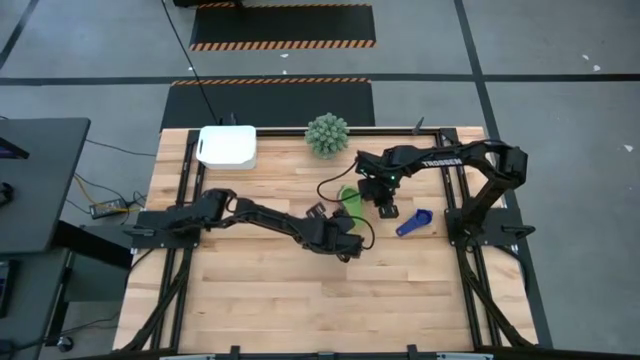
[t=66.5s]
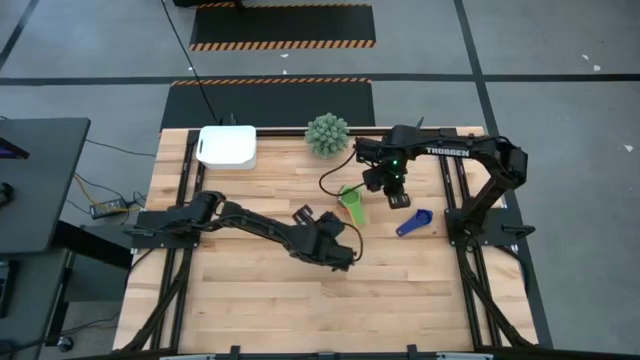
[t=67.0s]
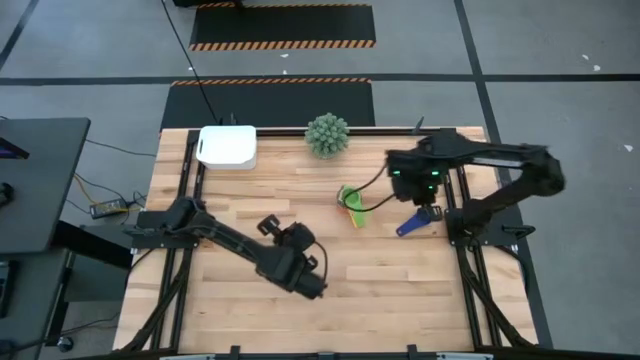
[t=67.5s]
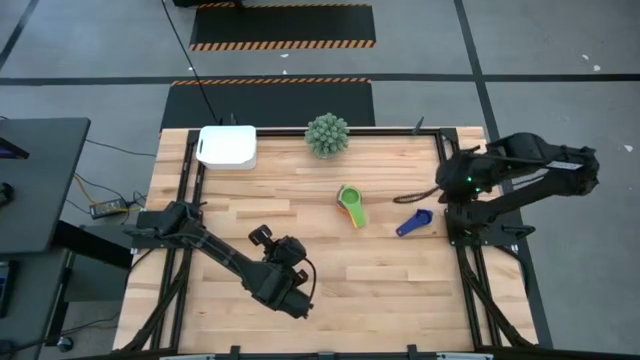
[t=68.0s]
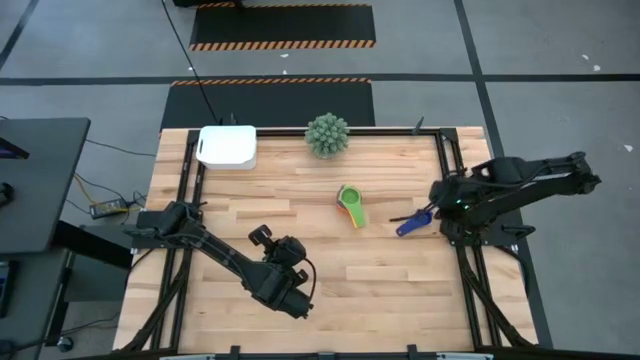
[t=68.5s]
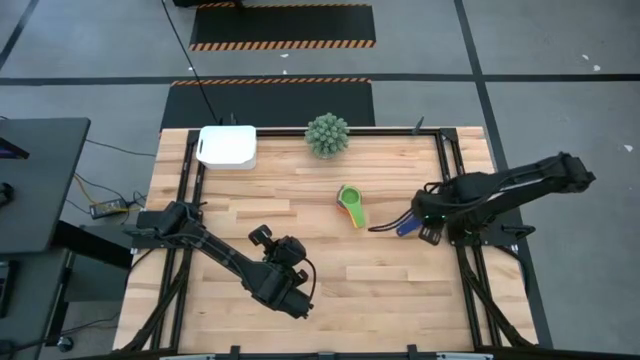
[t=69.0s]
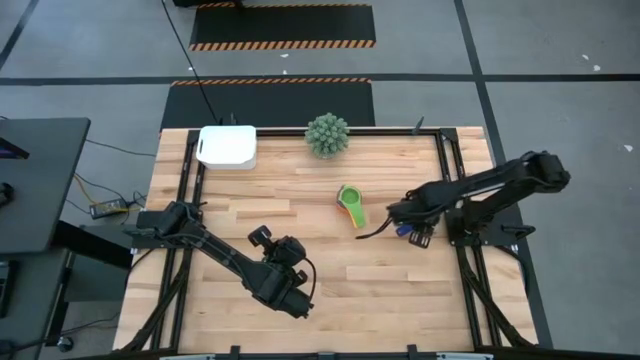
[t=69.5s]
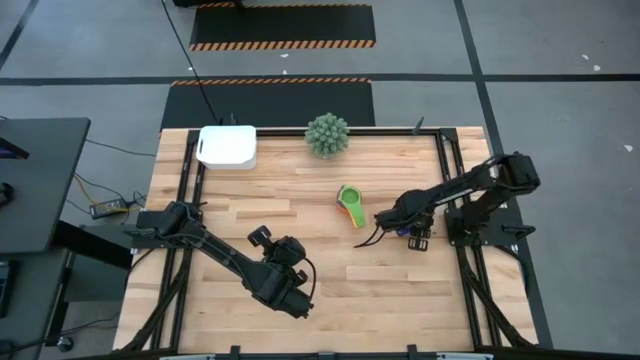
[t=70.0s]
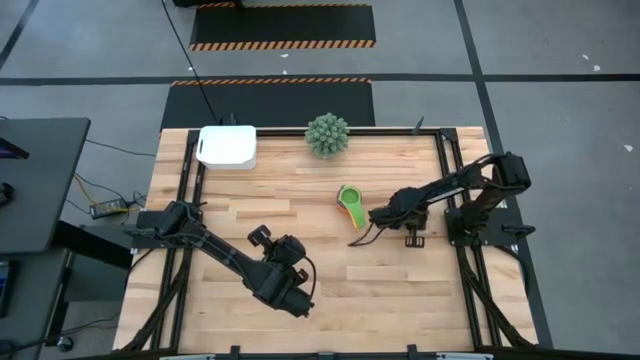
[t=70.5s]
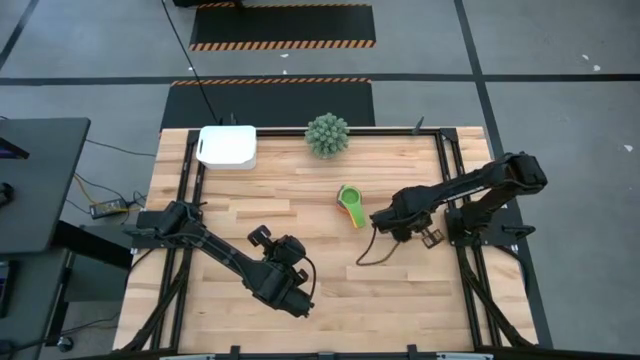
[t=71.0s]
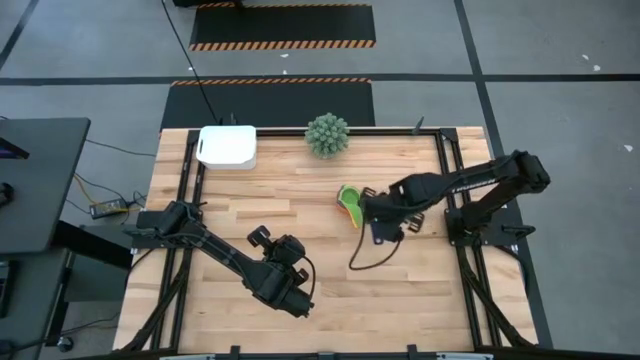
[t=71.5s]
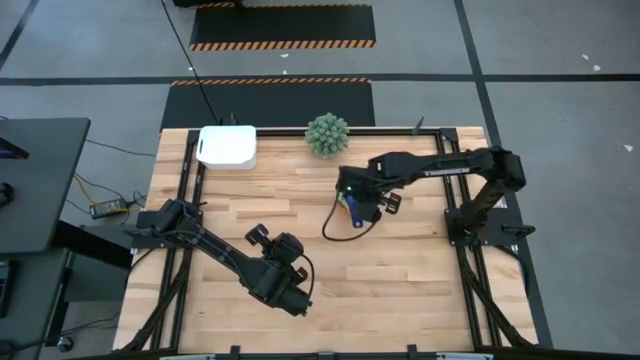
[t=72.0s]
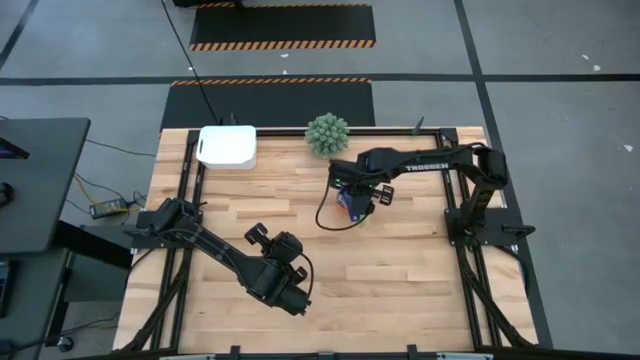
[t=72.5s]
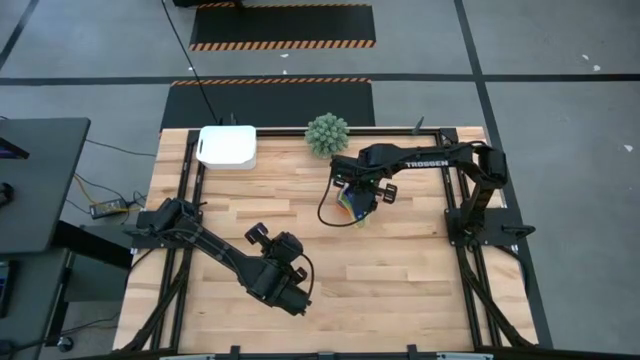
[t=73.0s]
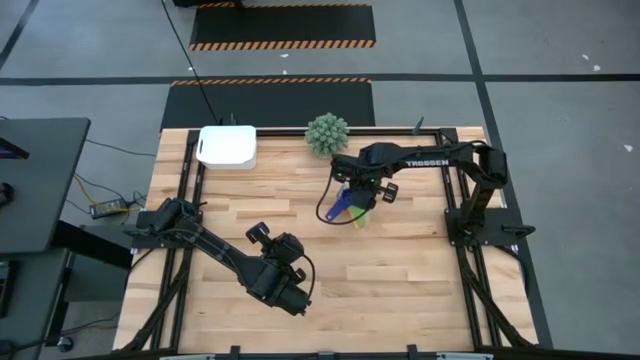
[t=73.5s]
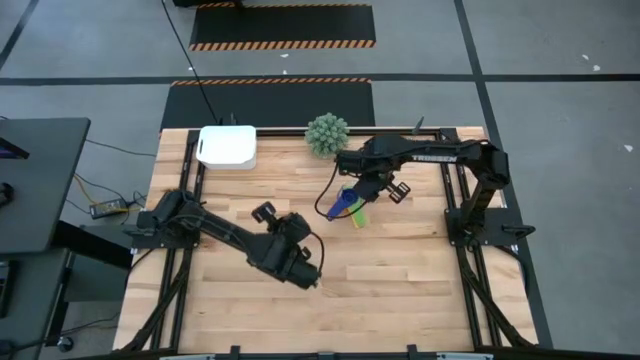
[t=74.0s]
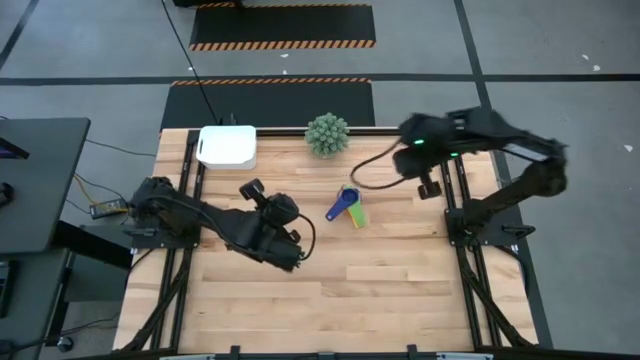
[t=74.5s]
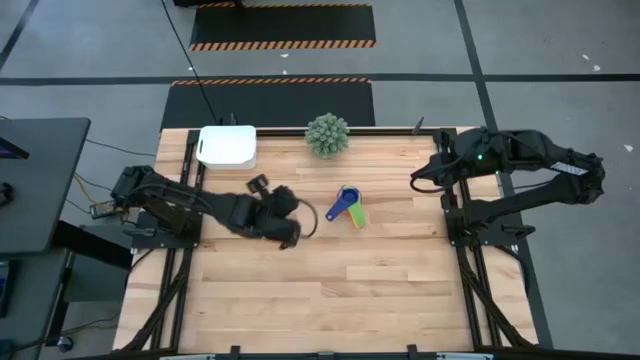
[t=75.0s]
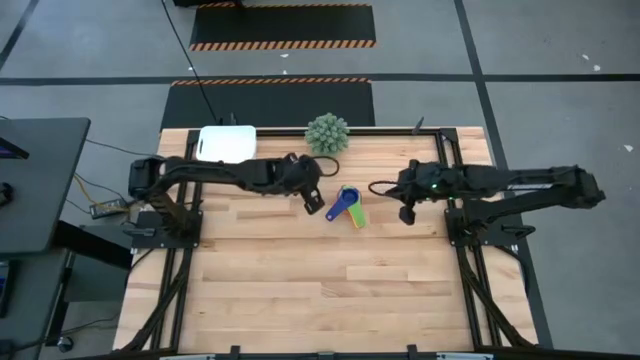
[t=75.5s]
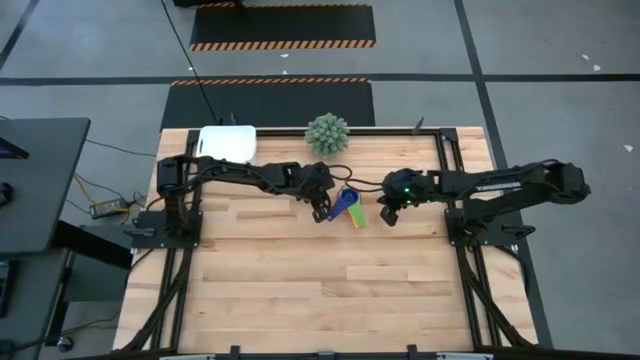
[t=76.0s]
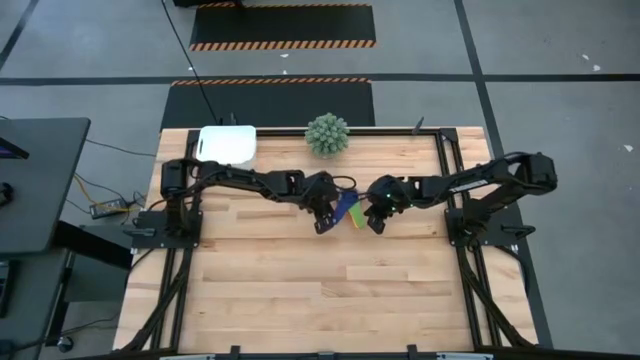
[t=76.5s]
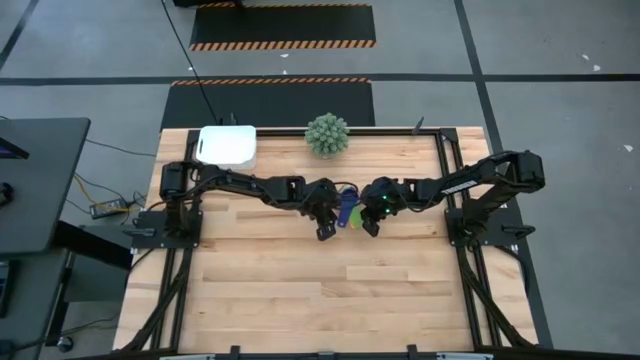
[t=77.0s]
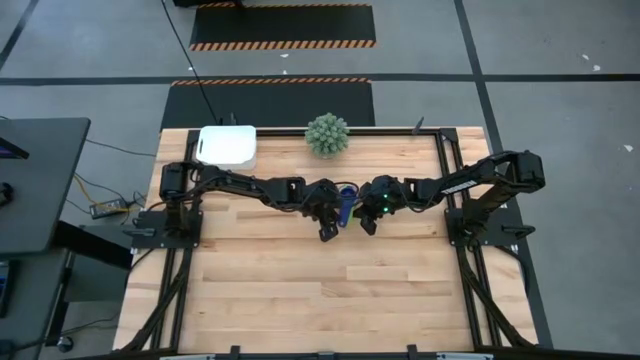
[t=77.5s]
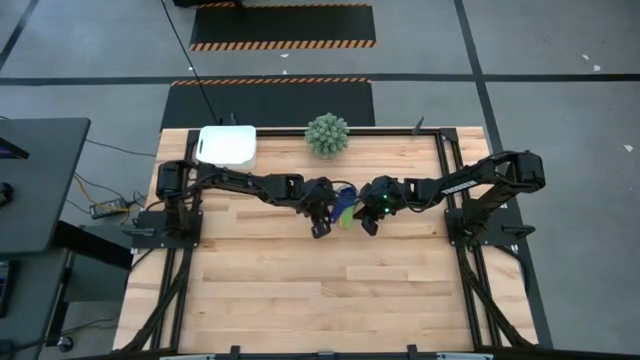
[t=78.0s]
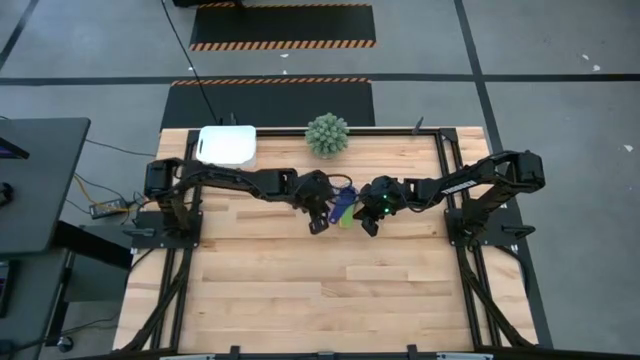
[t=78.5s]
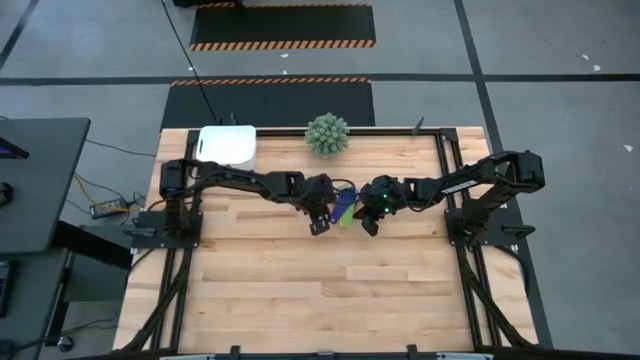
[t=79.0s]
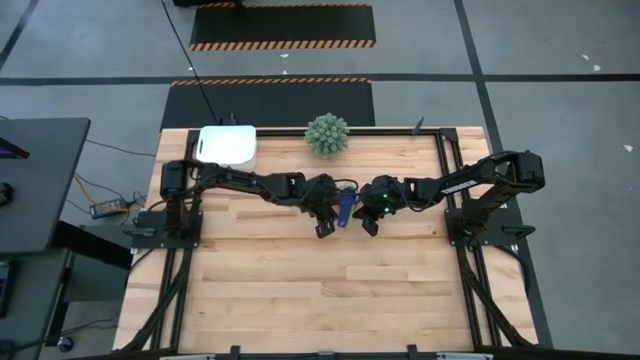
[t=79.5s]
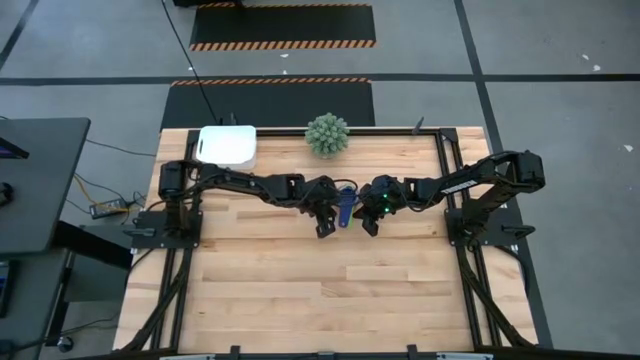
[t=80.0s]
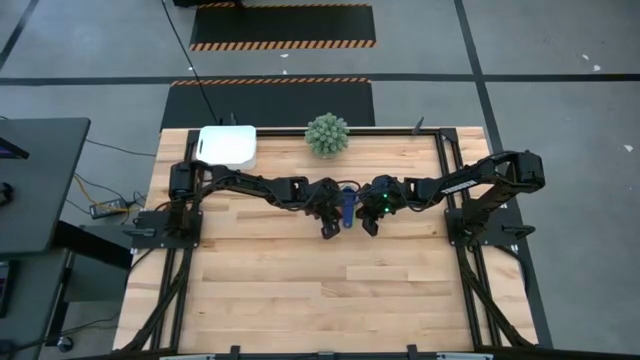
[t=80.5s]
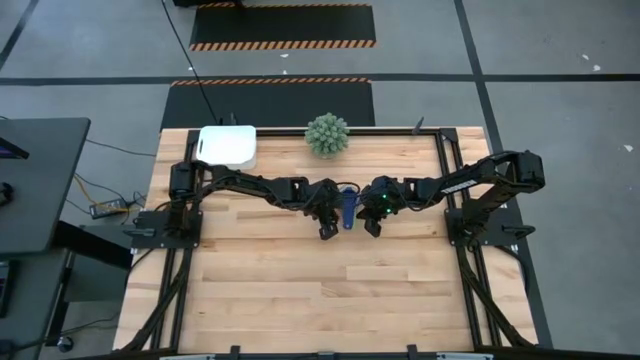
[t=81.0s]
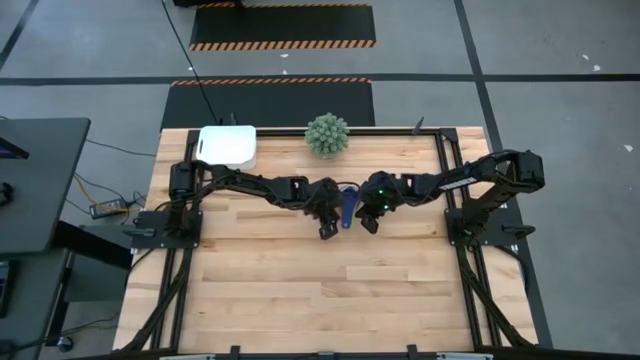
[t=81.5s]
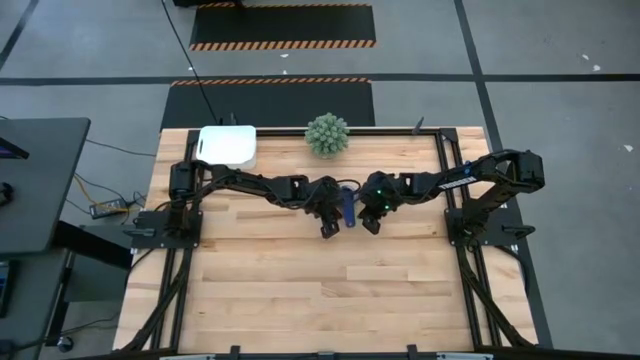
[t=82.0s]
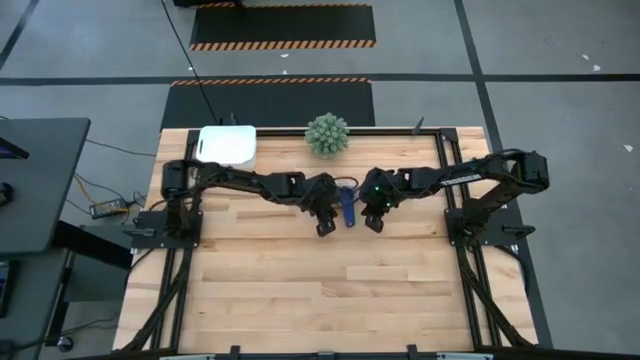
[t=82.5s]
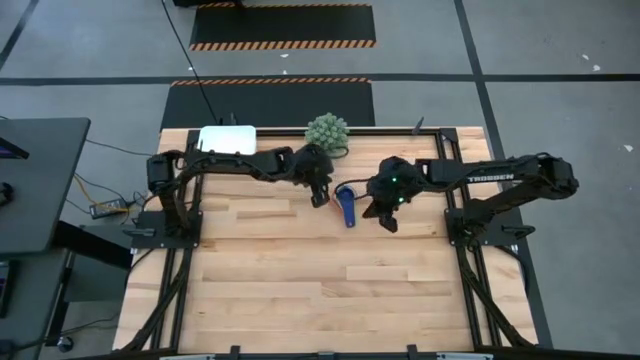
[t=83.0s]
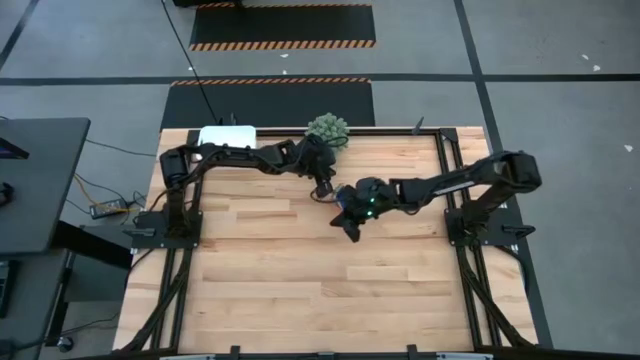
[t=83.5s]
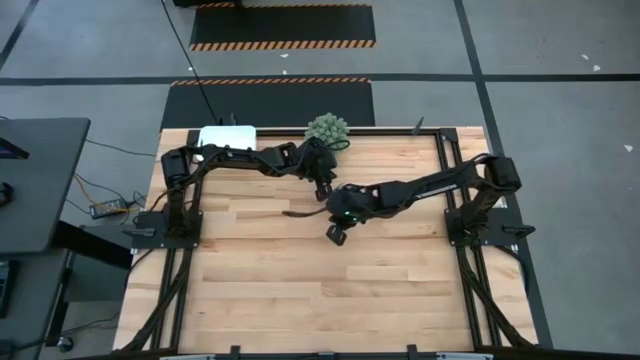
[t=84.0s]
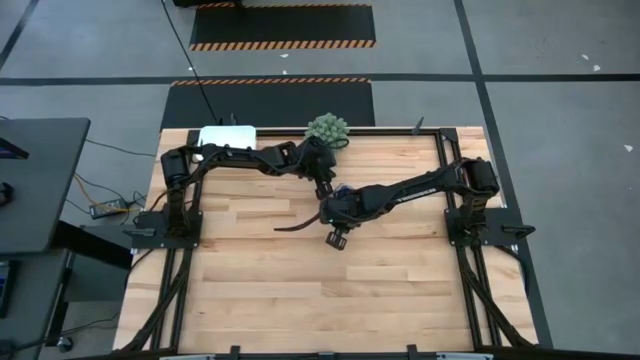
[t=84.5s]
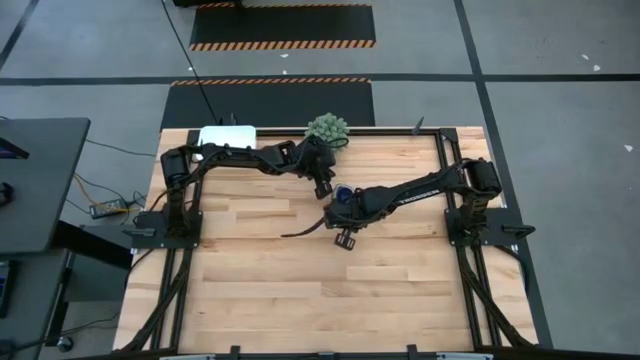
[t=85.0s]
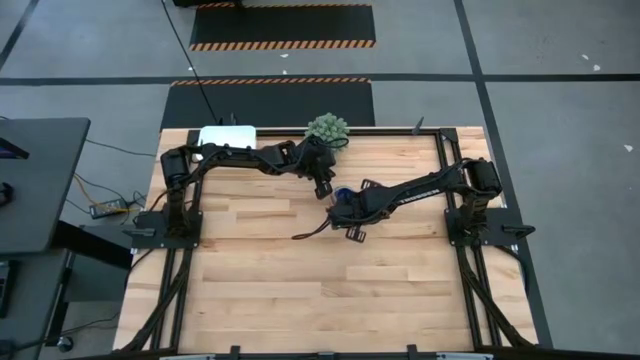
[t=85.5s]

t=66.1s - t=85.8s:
Task: Nest measuring cups in basket
Stack the violet measuring cup on top of the green measuring cup

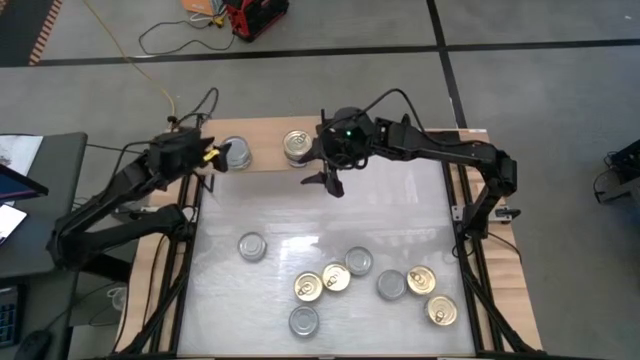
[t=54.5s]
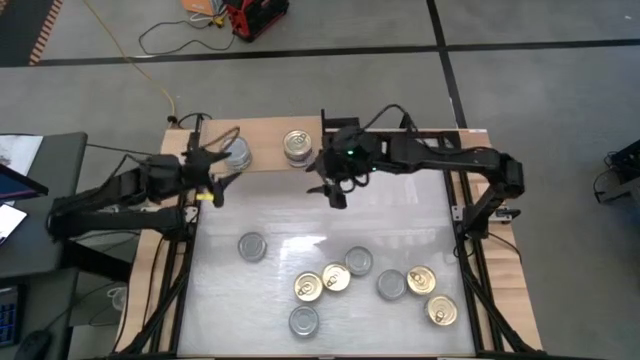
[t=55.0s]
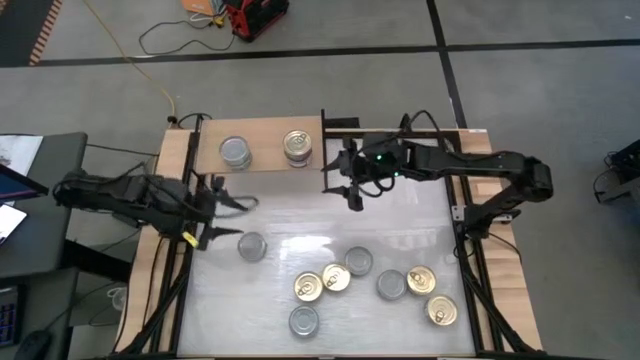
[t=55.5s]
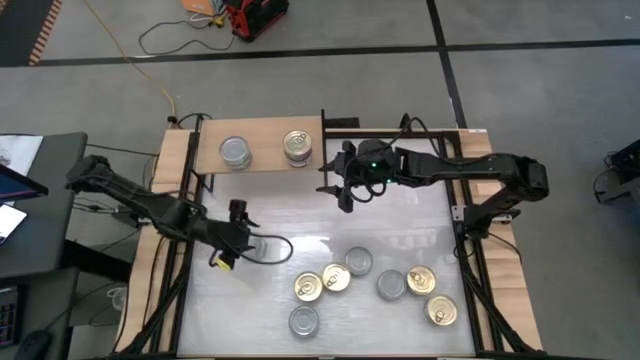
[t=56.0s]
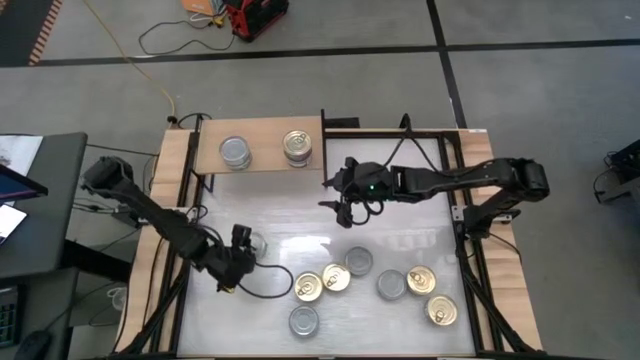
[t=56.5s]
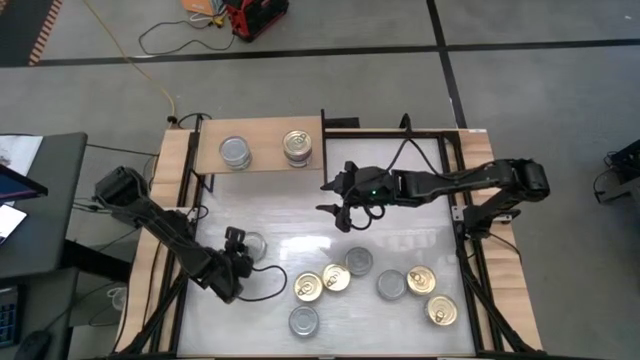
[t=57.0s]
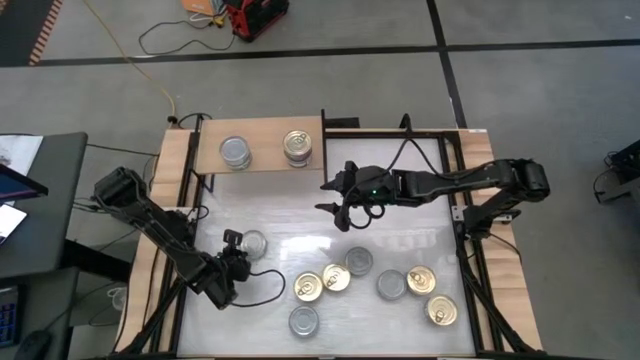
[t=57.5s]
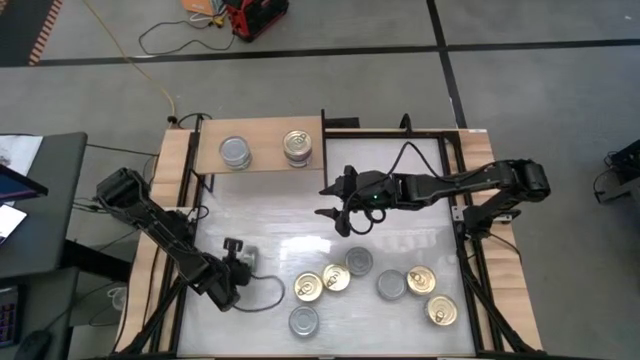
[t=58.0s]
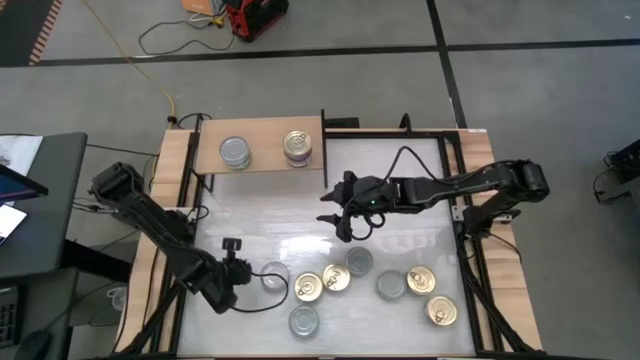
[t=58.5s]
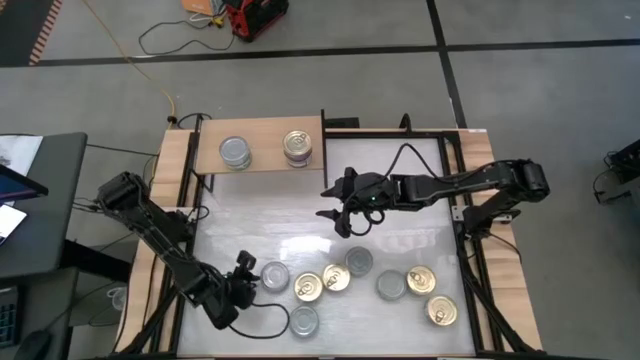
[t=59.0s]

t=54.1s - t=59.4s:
Task: Stack canned seafood by type on shelf
Stack the green-white tuna can on top of the other green-white tuna cans on the shelf
